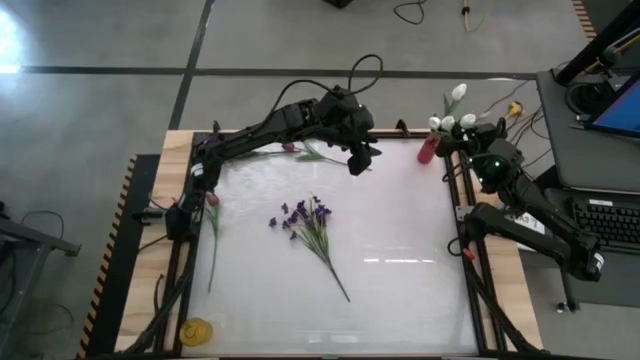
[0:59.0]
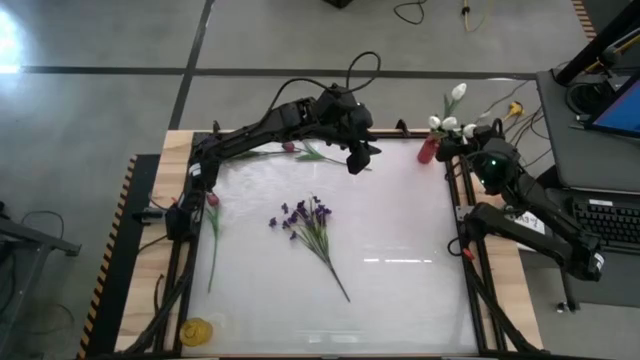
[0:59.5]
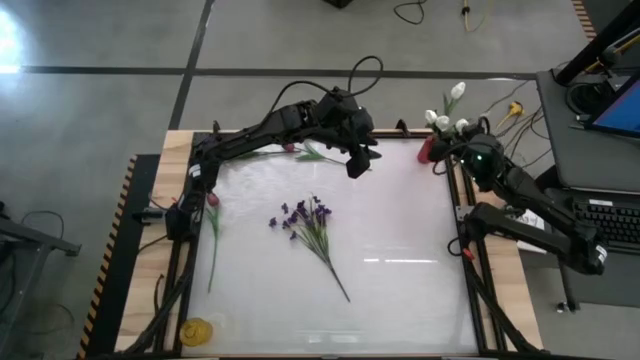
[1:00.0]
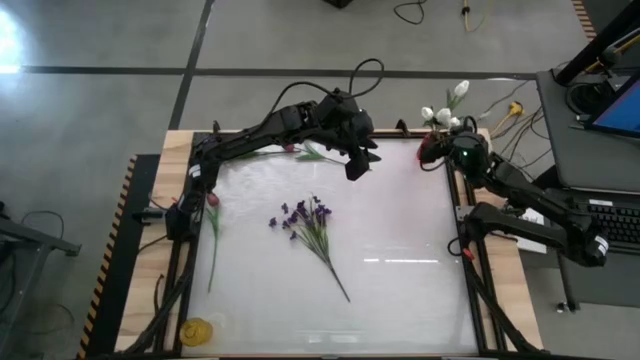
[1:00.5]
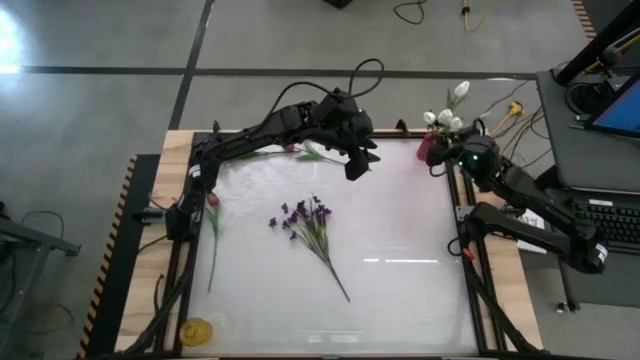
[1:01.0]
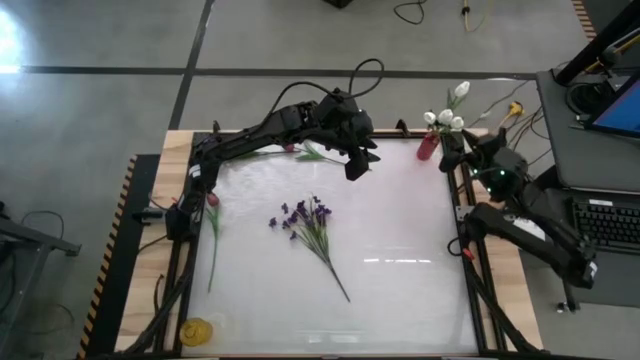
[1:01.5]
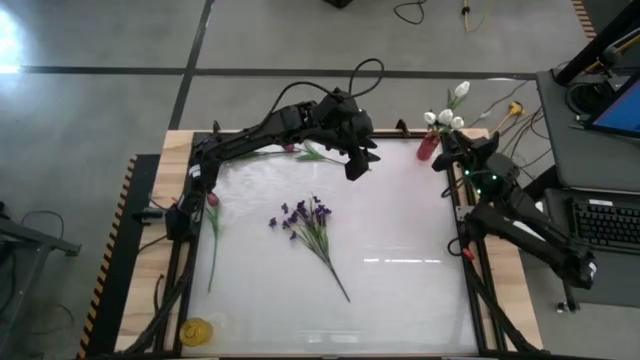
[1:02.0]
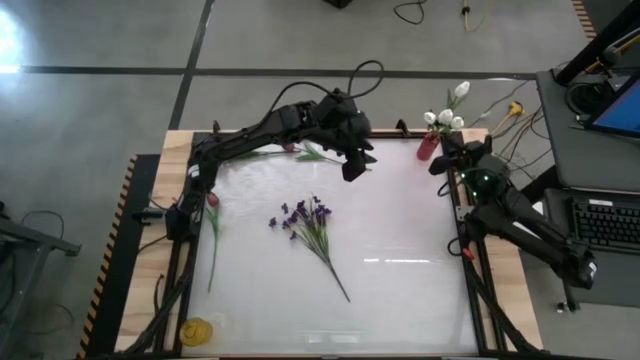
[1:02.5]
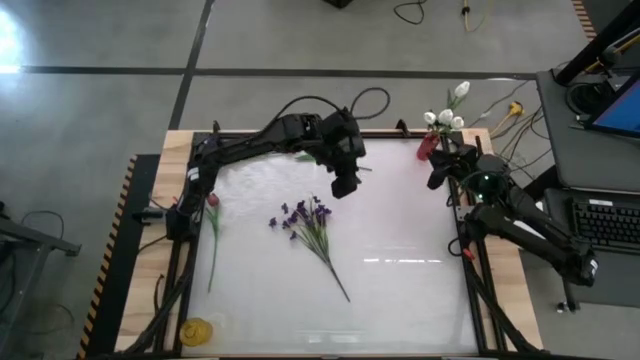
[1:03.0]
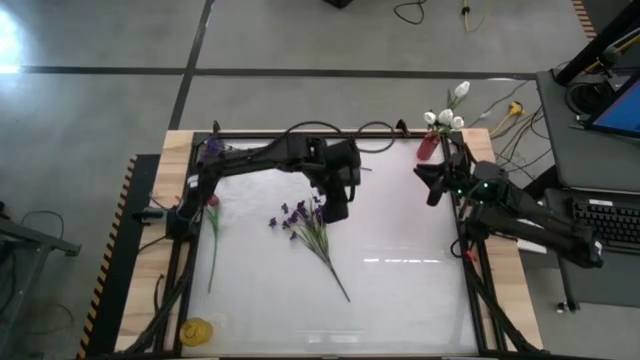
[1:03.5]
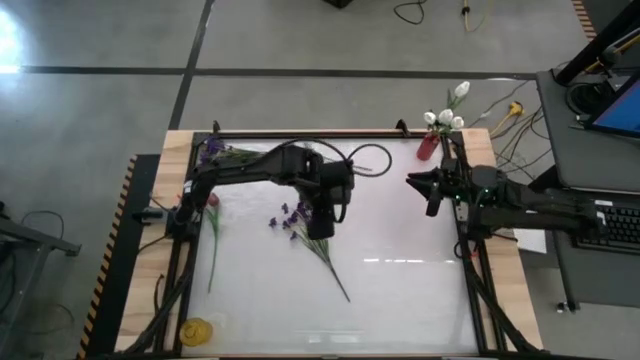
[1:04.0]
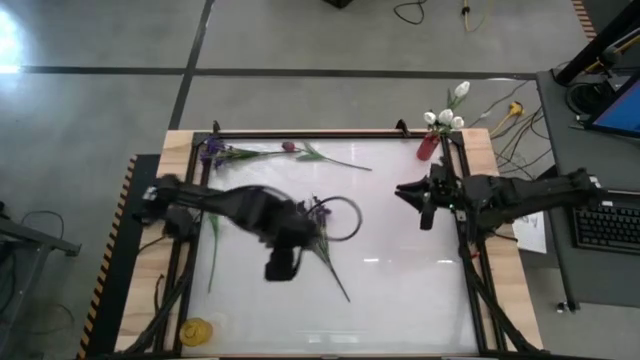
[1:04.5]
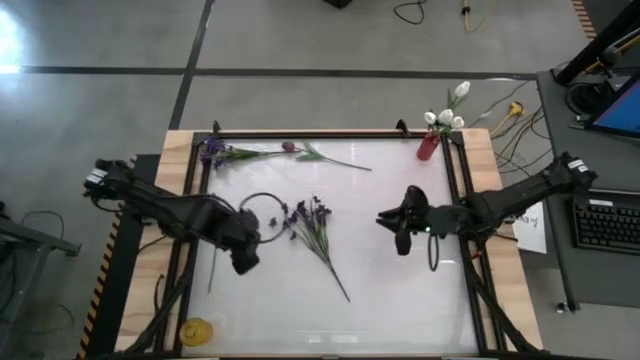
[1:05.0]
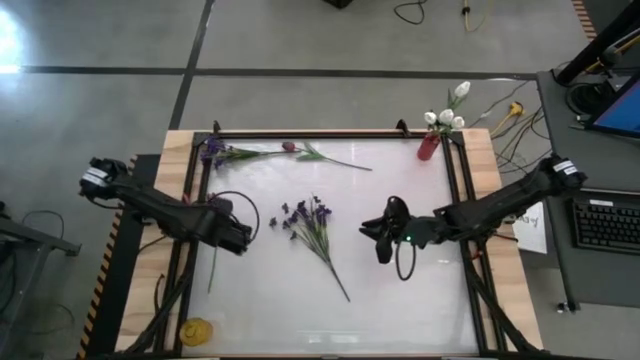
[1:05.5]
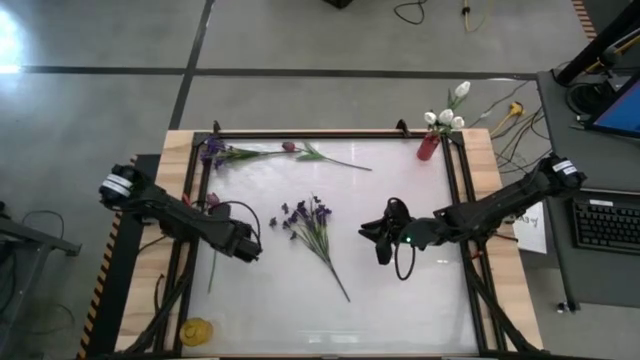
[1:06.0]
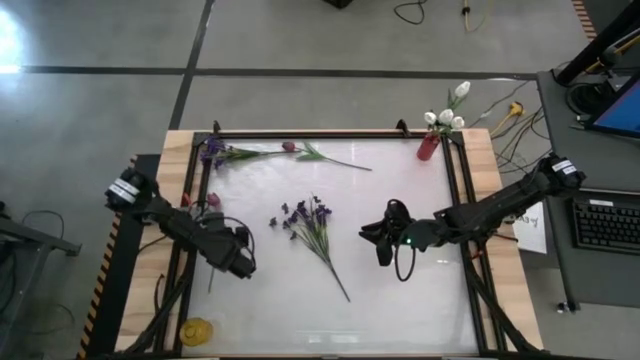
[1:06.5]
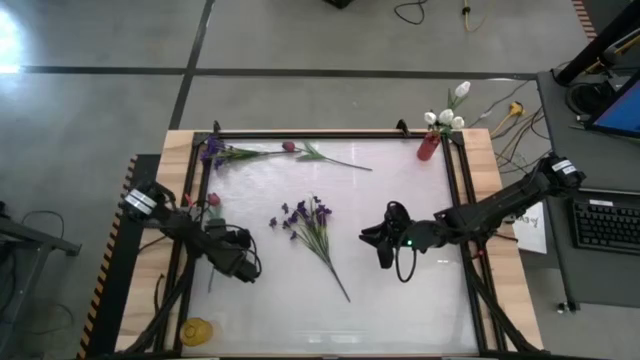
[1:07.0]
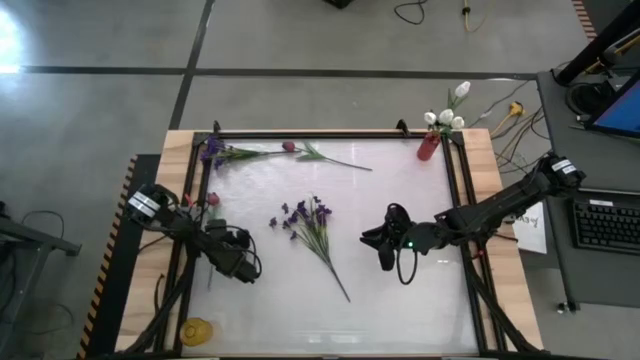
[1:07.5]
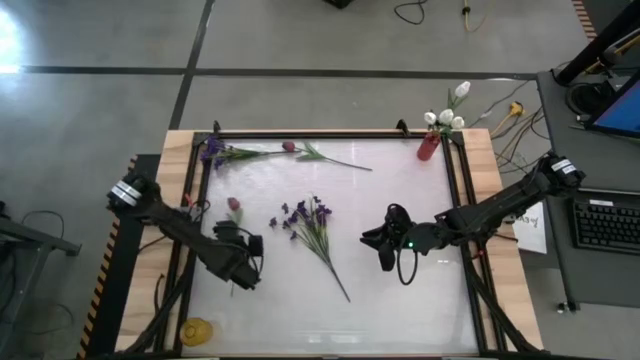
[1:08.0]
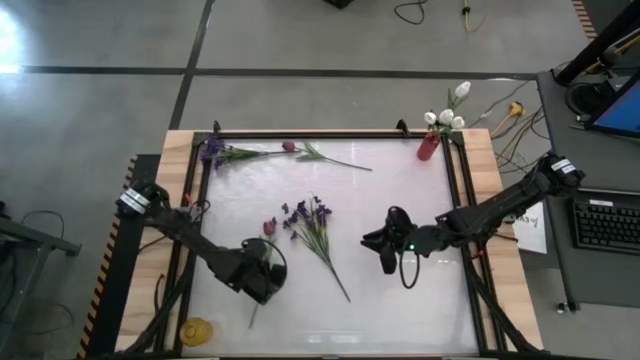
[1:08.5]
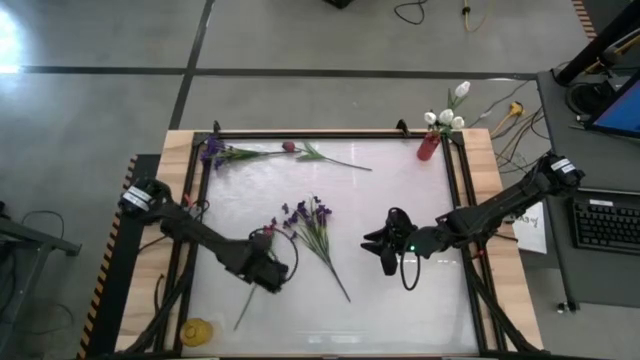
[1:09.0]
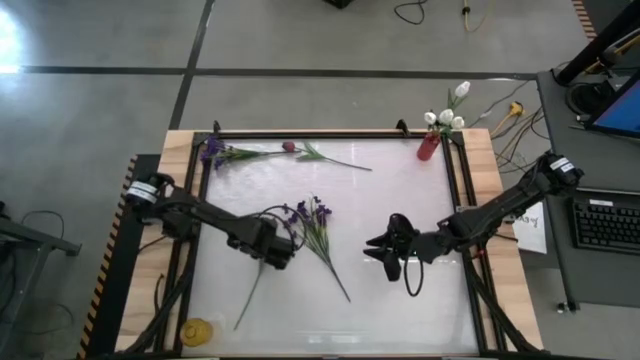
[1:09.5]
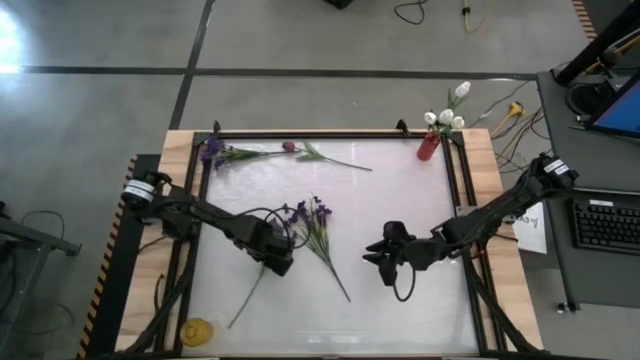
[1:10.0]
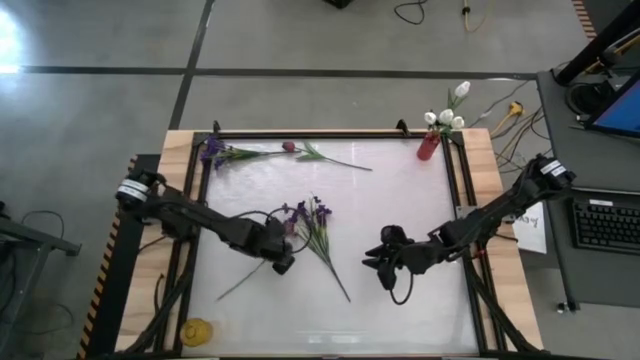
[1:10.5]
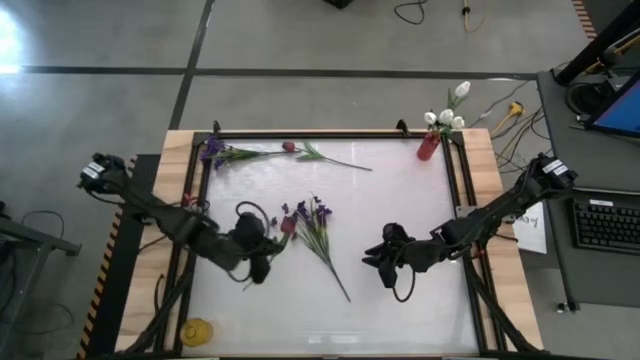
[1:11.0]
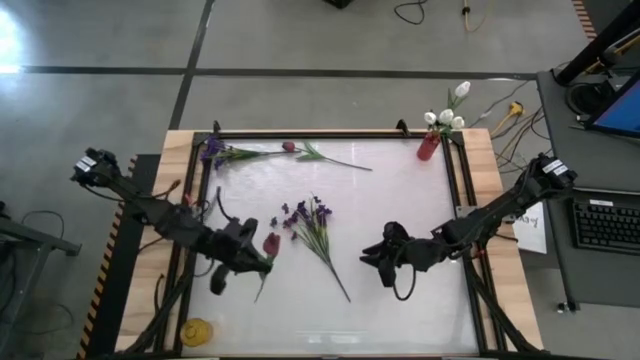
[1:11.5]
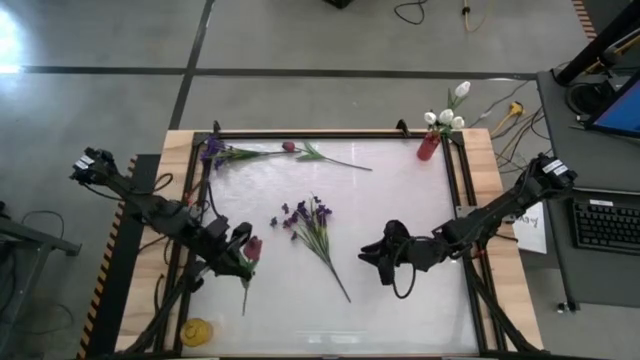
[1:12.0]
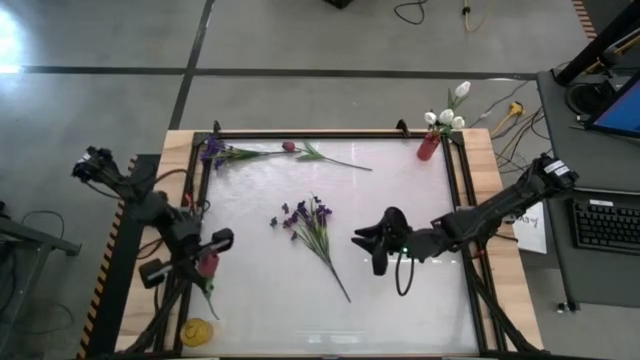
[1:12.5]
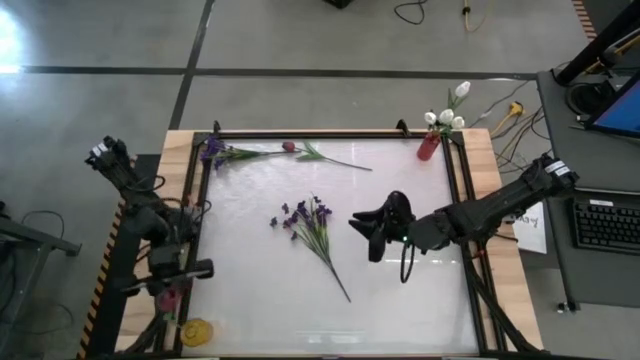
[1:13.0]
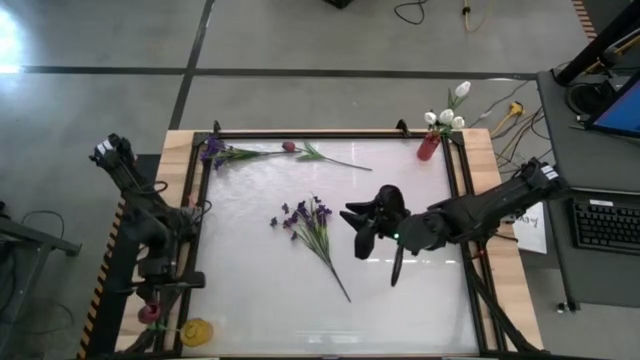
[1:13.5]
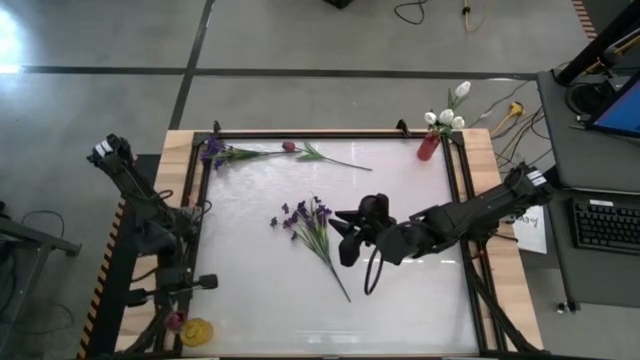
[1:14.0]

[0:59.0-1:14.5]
Task: Sort flowers into vase by color
Put the middle red tulip into the yellow flower vase

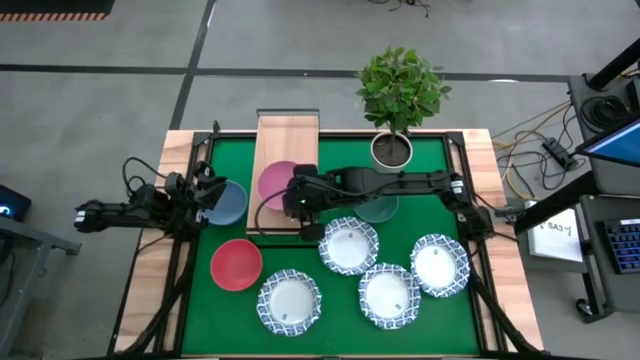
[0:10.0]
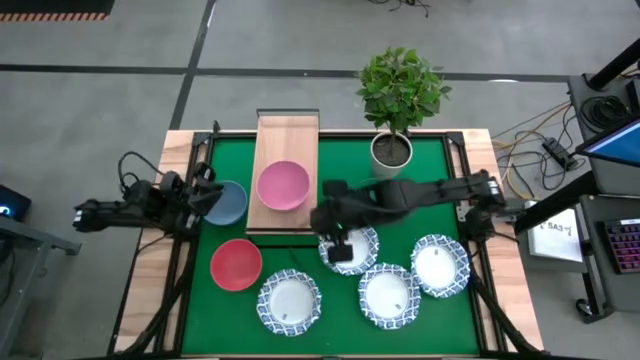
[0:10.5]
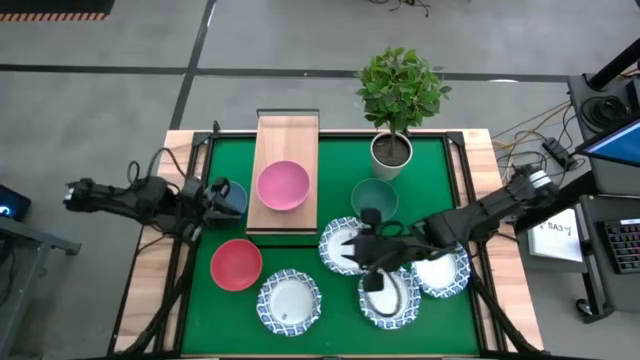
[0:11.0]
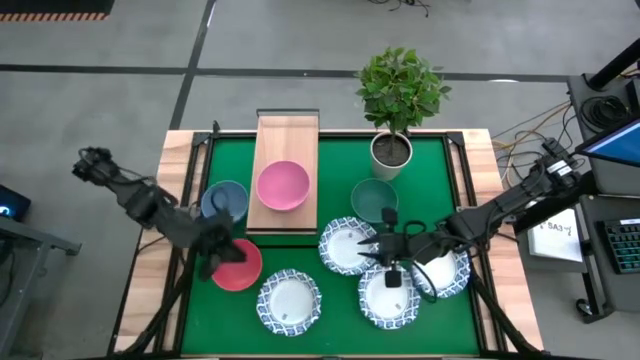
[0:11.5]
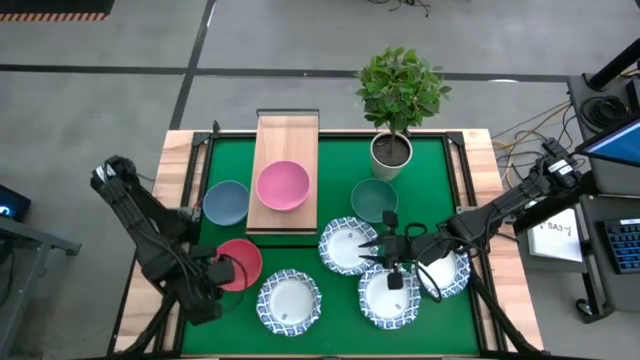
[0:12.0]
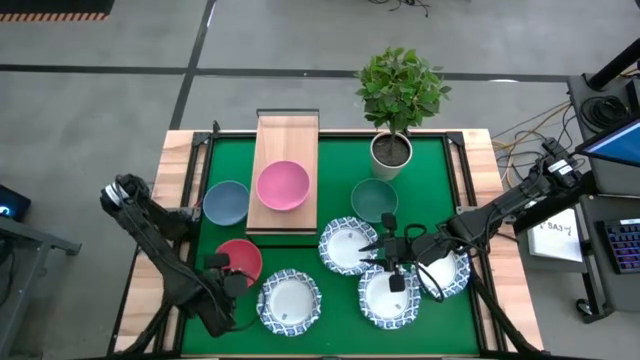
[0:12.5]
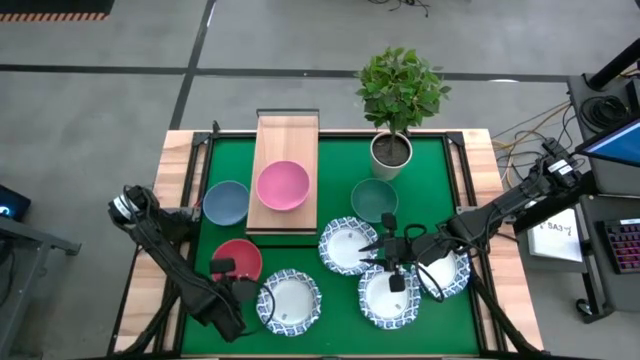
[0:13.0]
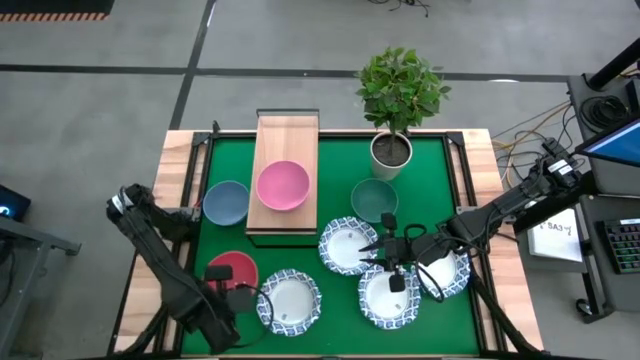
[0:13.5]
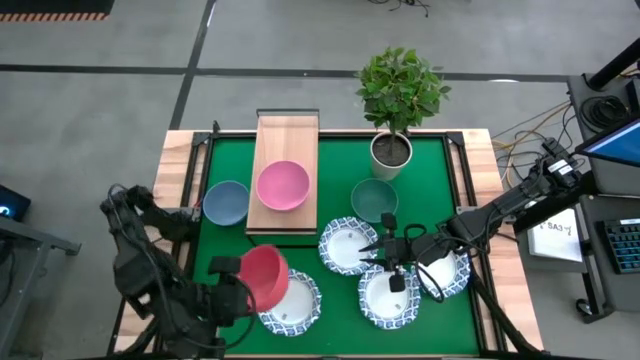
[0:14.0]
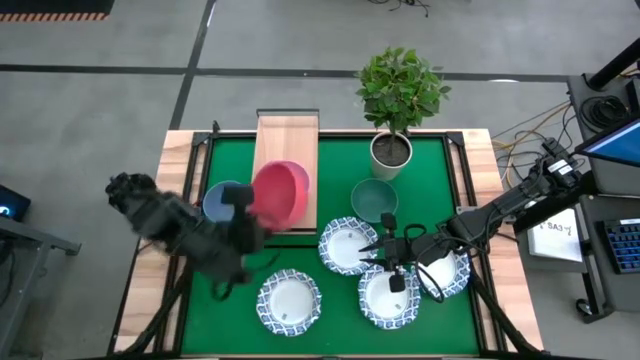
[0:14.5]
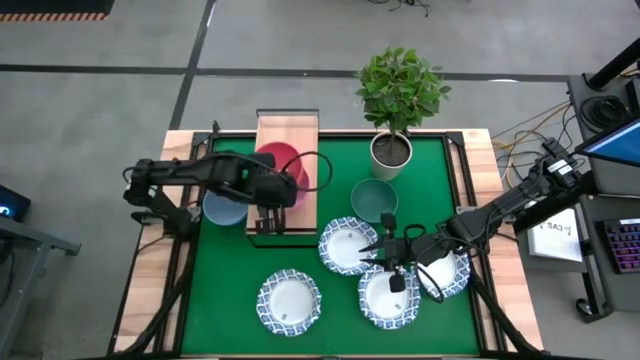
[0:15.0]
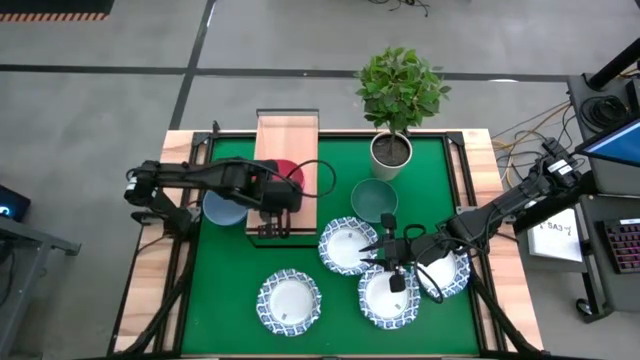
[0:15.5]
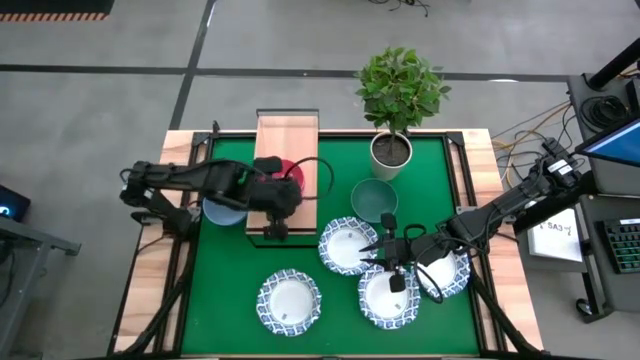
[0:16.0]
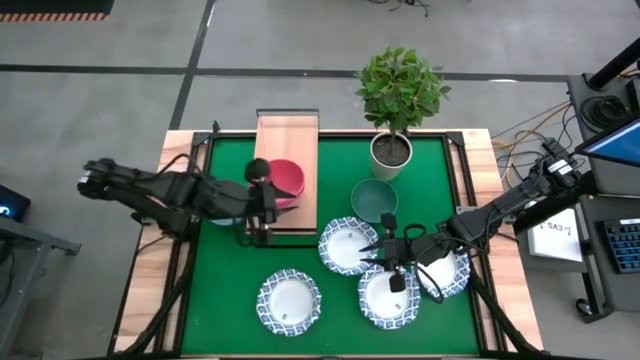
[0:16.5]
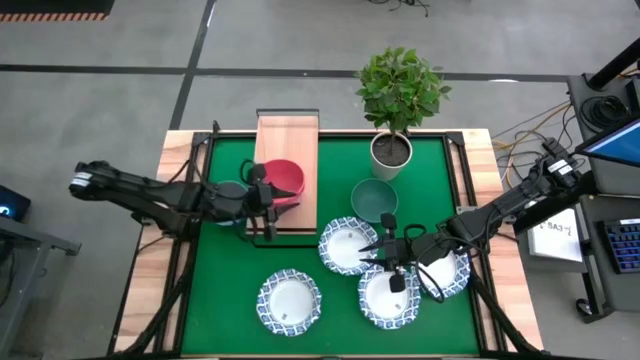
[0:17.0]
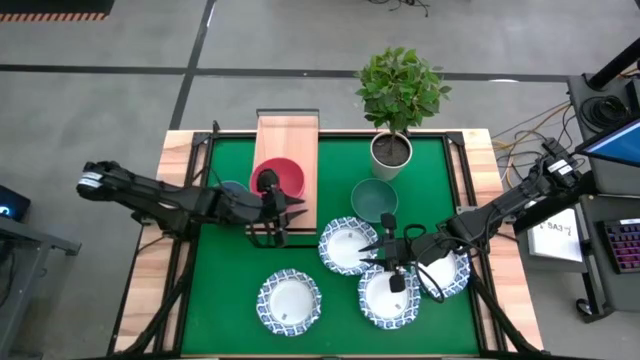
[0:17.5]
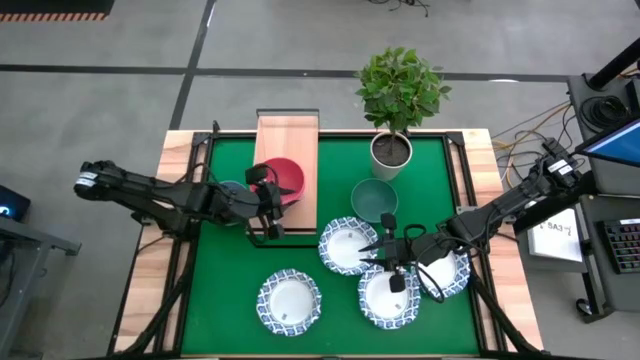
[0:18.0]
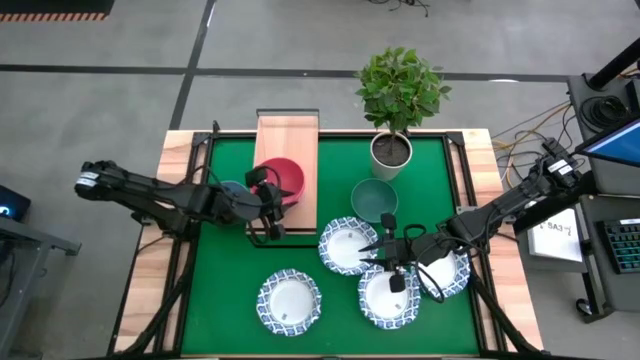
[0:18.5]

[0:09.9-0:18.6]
Task: Place and stack bowls onto a shelf
Stack the orange bowl on top of the pink bowl on the shelf
